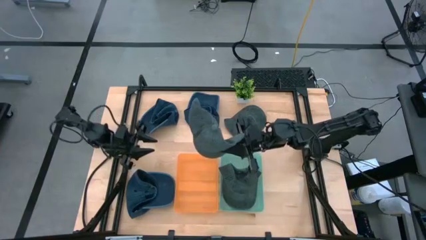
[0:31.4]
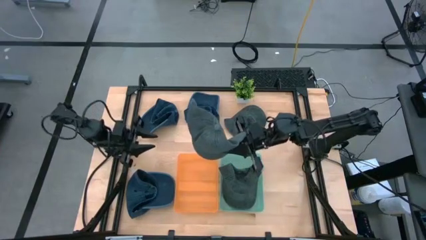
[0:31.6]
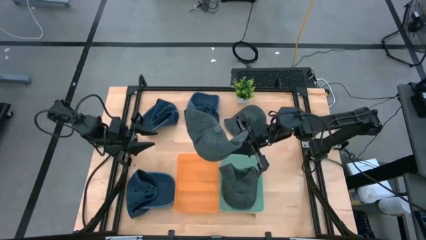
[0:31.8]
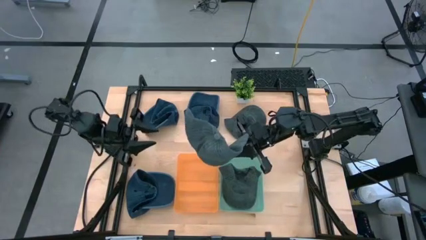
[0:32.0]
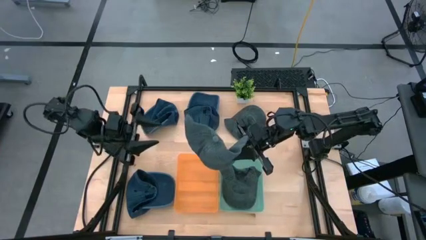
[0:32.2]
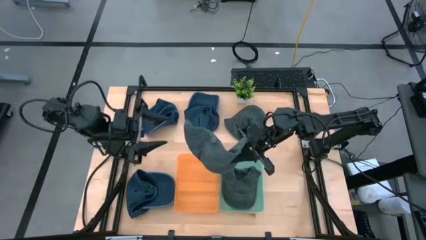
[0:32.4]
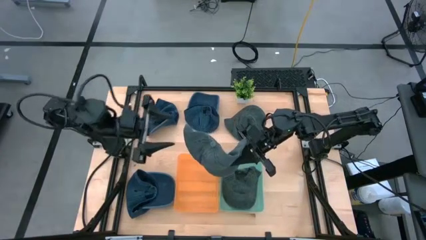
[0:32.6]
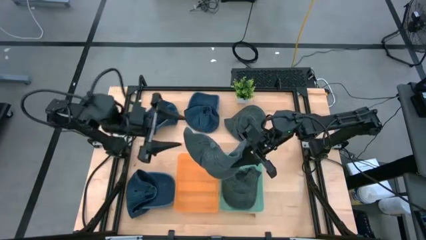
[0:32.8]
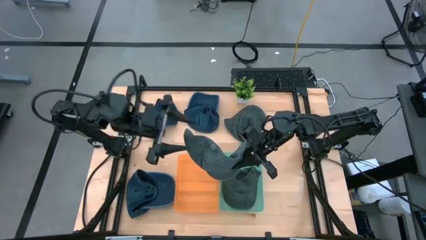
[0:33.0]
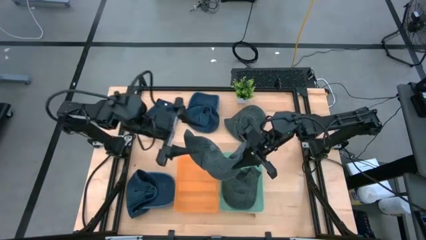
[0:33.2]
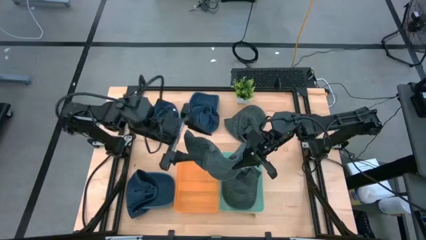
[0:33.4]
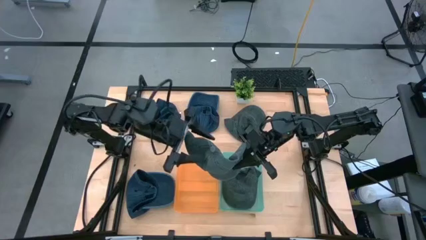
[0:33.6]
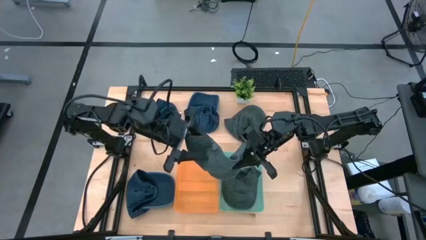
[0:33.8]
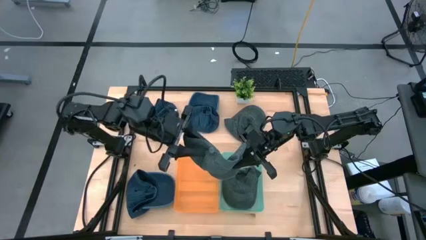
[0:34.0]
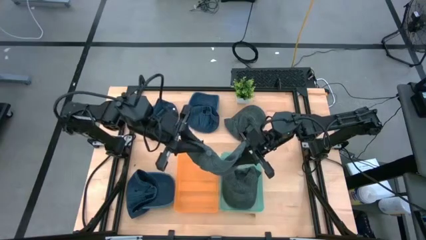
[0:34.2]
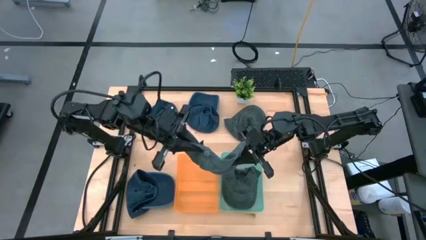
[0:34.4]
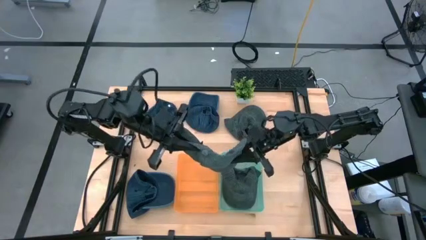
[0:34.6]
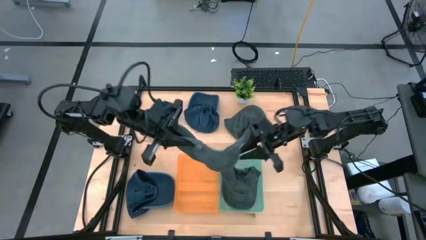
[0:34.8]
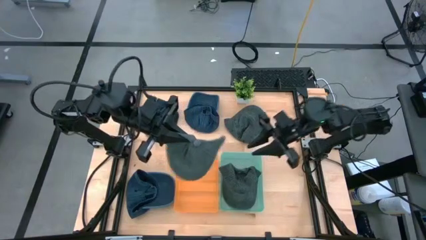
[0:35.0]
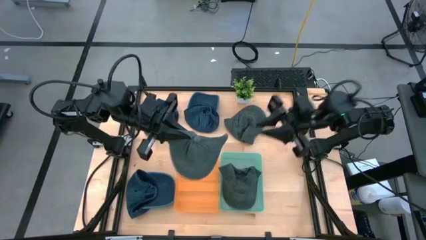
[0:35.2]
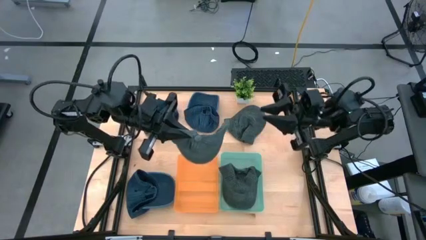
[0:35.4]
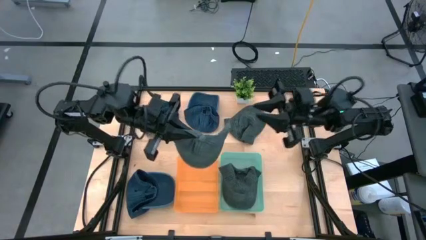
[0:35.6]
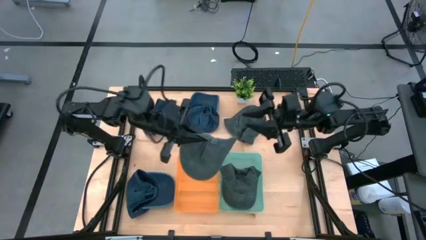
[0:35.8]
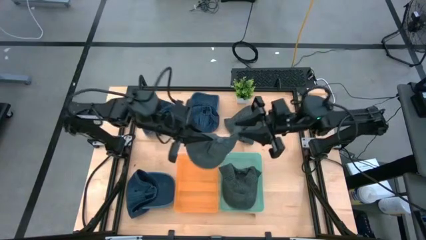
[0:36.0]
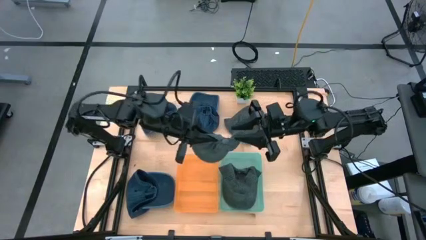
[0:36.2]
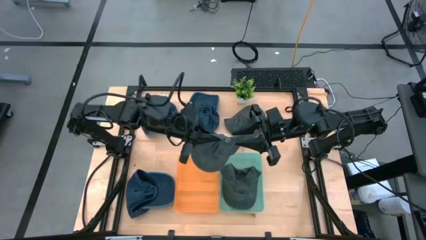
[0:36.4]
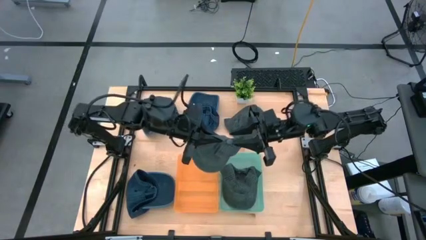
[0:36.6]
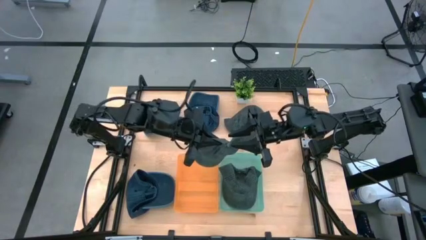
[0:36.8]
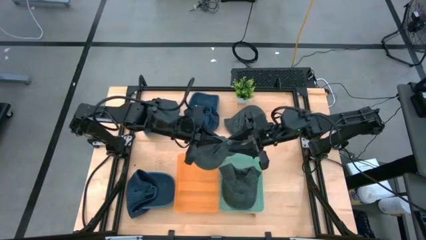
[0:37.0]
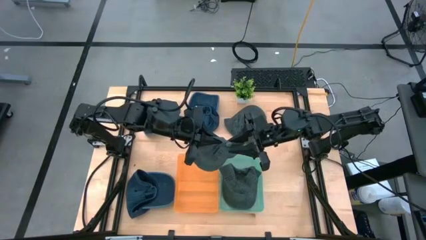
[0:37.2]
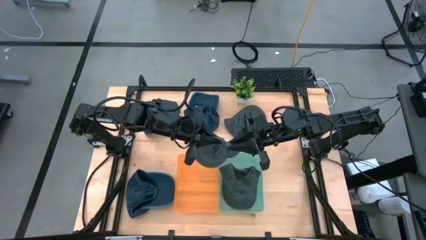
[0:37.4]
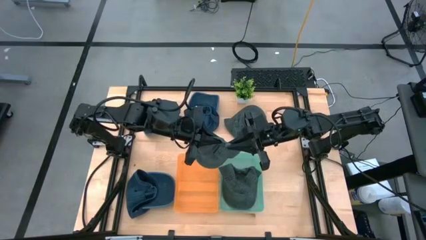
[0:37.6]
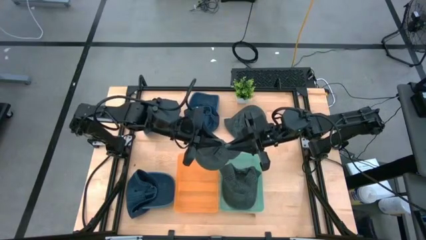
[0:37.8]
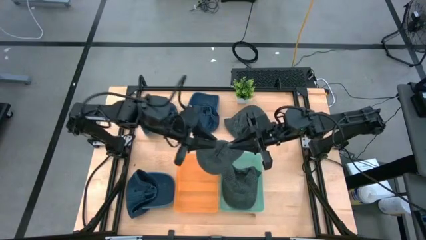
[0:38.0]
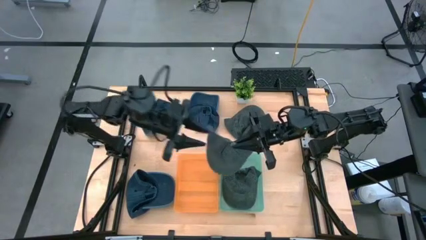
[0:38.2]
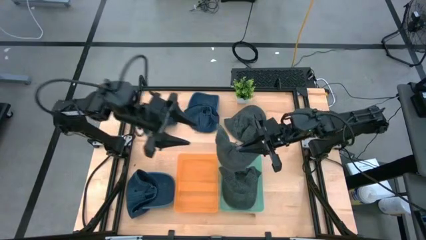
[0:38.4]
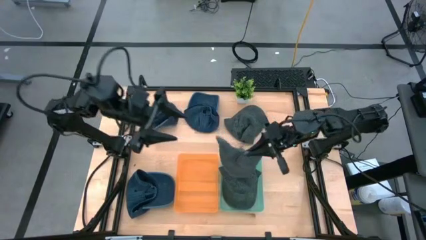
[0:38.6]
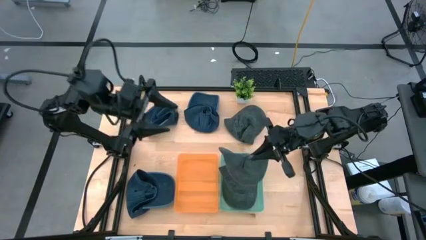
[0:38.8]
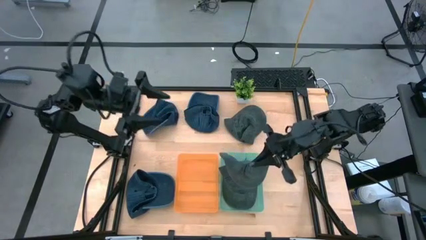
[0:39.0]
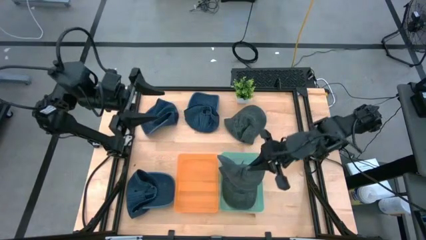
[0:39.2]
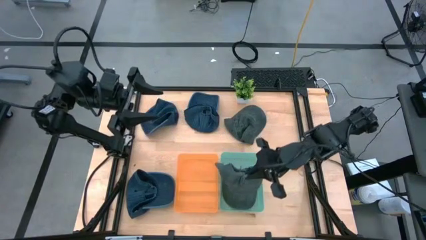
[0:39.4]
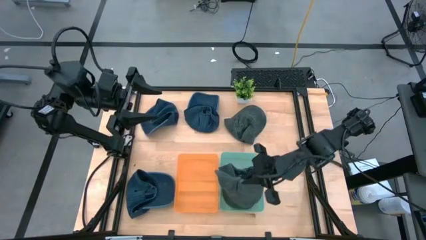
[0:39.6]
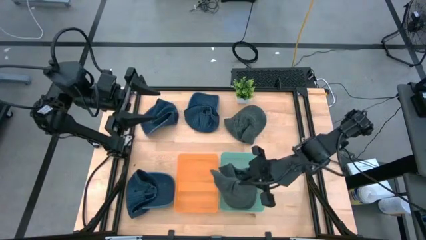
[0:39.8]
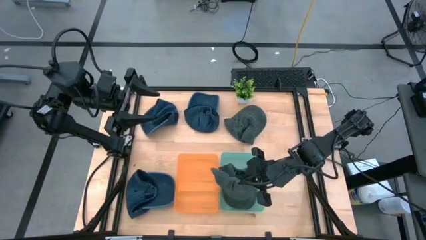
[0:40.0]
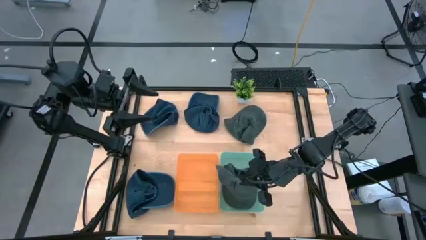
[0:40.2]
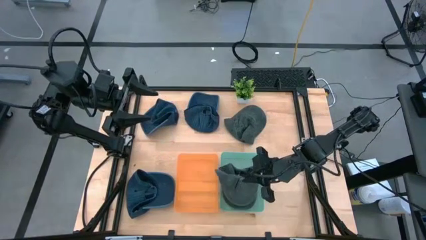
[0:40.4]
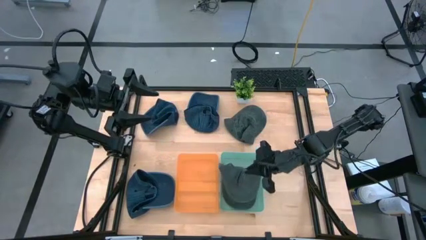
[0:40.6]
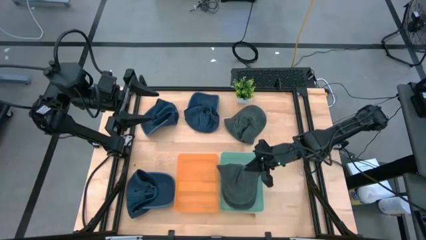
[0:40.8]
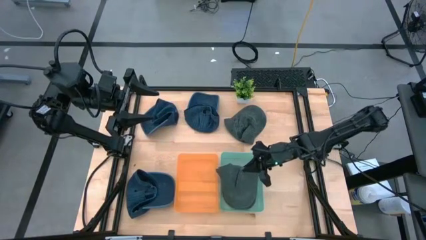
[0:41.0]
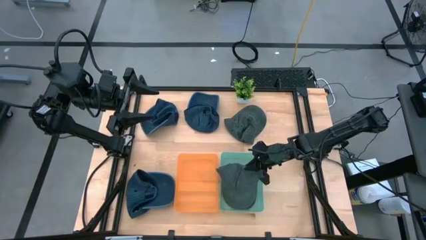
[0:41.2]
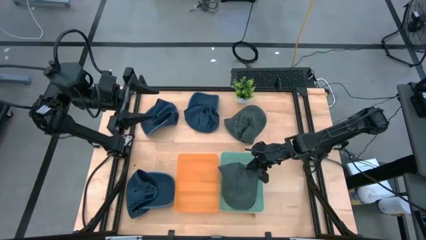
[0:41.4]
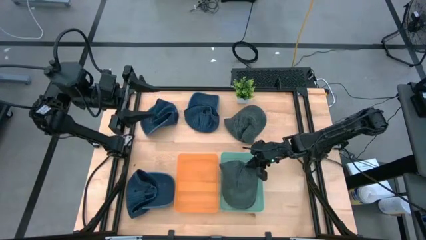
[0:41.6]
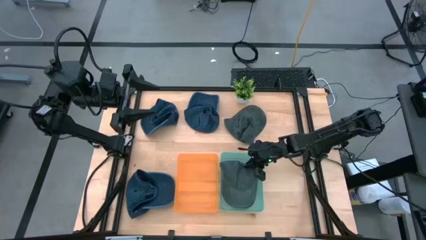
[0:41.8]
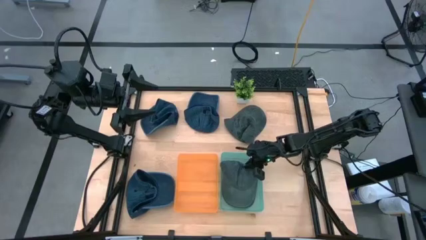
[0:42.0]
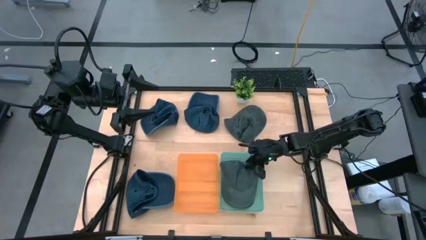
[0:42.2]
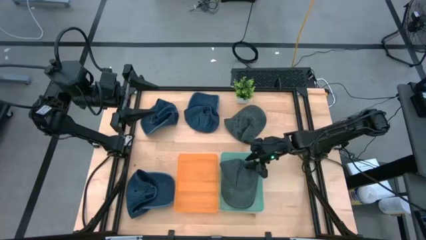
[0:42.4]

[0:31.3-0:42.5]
Task: Pick & Place hat
Put the bottom black cap into the green bin
